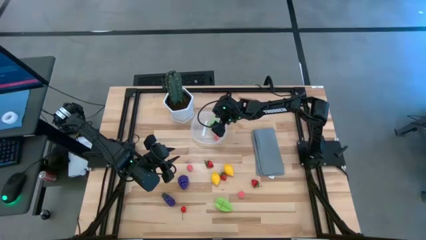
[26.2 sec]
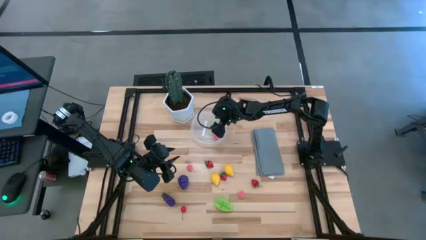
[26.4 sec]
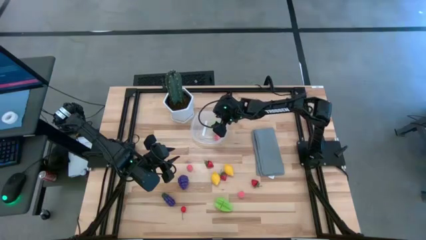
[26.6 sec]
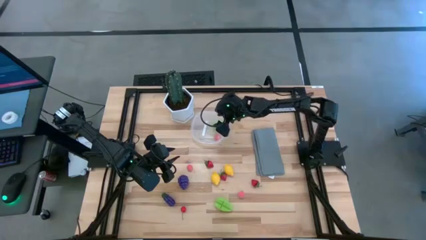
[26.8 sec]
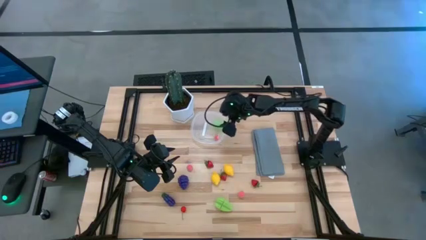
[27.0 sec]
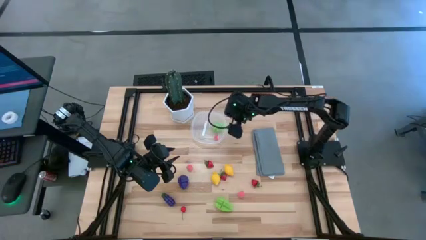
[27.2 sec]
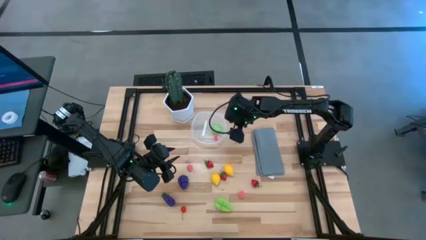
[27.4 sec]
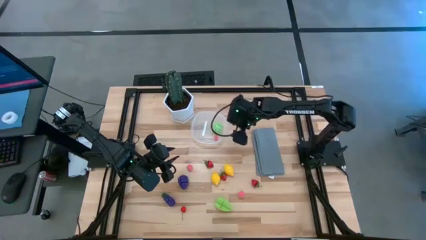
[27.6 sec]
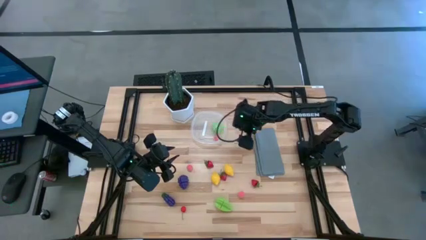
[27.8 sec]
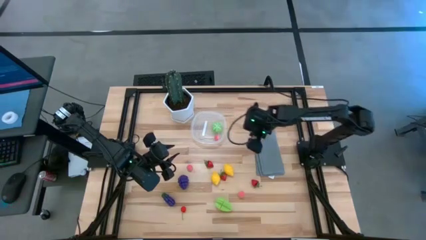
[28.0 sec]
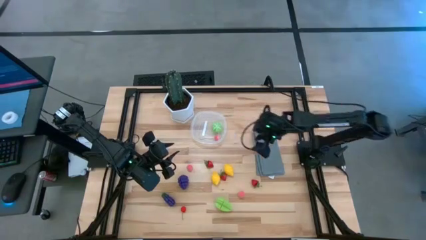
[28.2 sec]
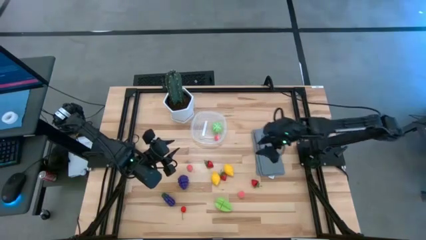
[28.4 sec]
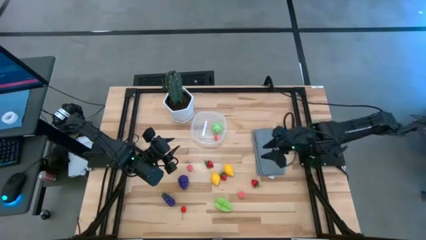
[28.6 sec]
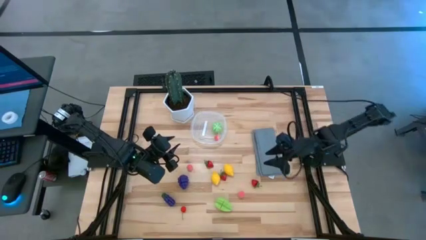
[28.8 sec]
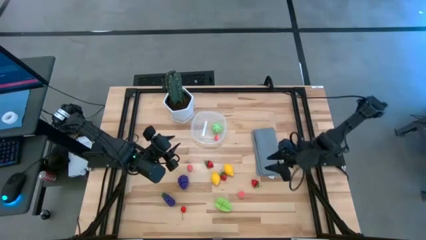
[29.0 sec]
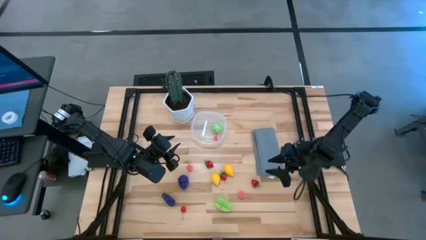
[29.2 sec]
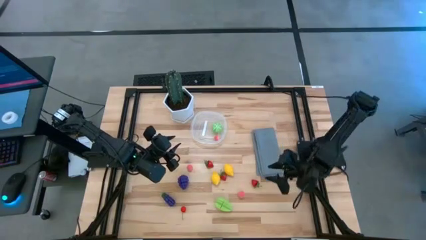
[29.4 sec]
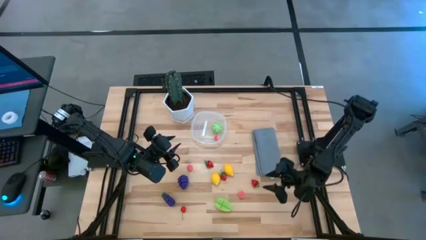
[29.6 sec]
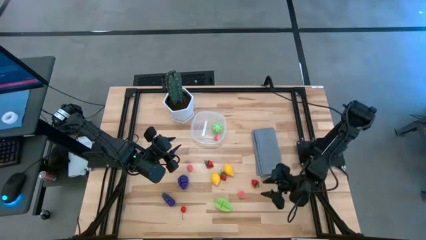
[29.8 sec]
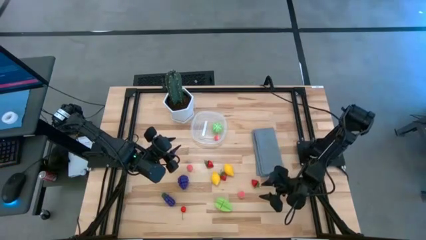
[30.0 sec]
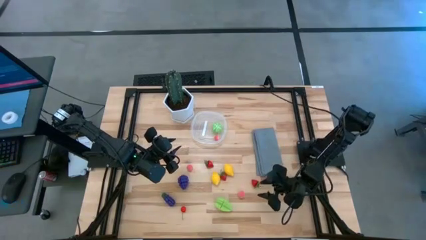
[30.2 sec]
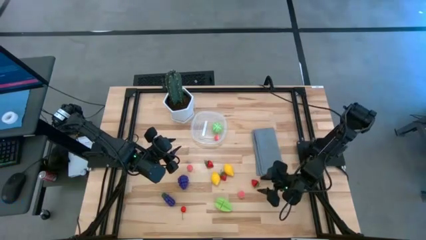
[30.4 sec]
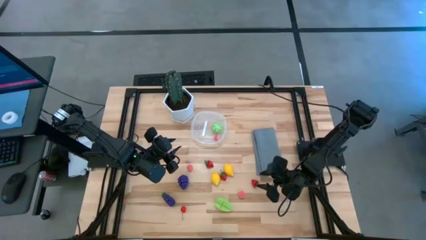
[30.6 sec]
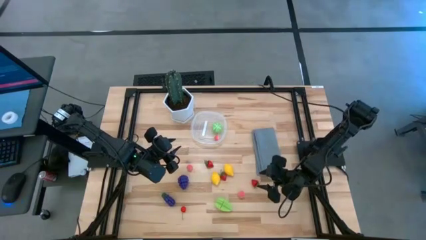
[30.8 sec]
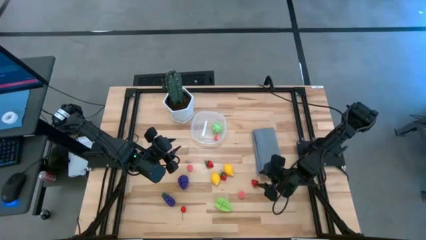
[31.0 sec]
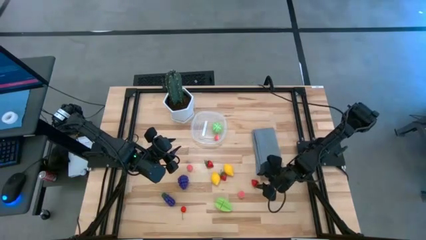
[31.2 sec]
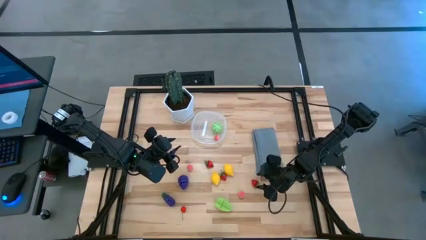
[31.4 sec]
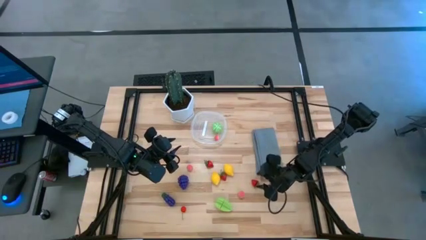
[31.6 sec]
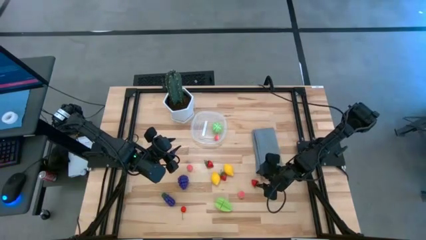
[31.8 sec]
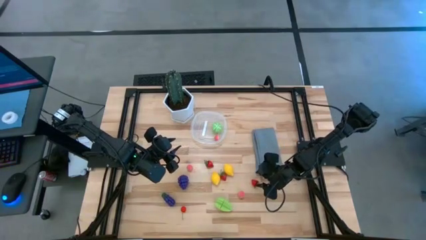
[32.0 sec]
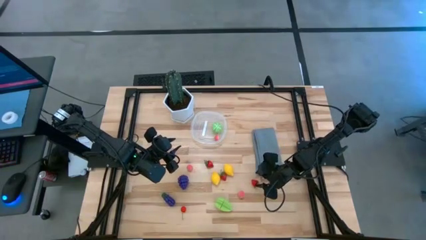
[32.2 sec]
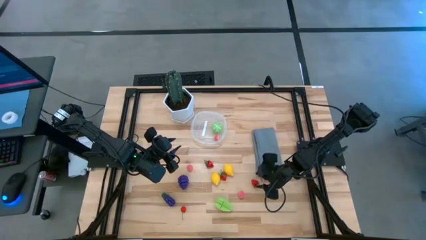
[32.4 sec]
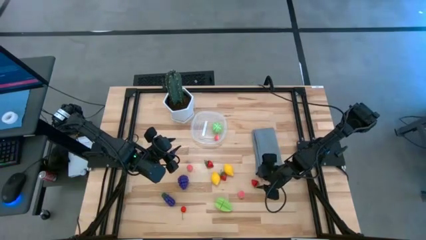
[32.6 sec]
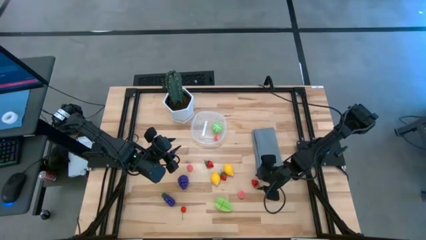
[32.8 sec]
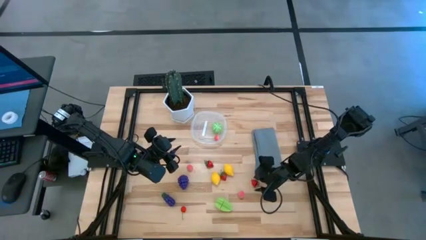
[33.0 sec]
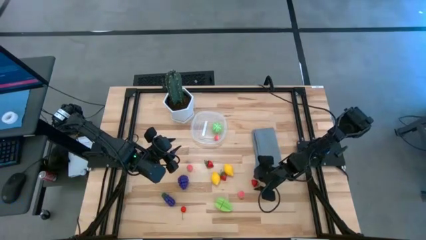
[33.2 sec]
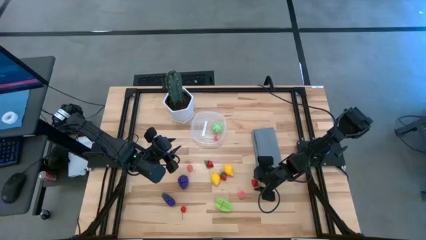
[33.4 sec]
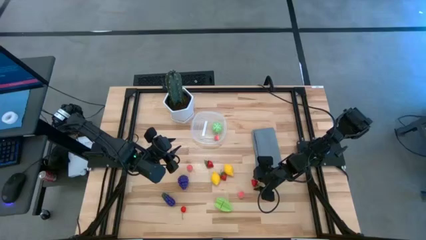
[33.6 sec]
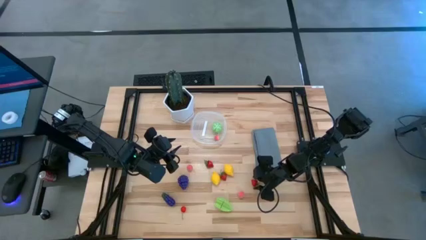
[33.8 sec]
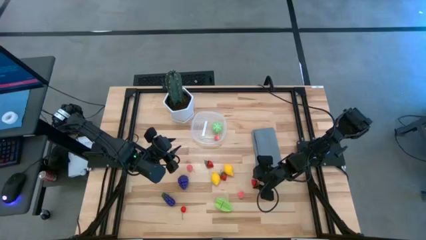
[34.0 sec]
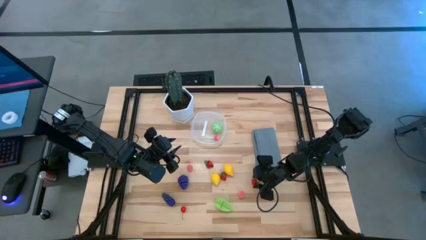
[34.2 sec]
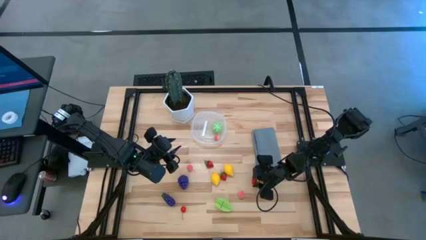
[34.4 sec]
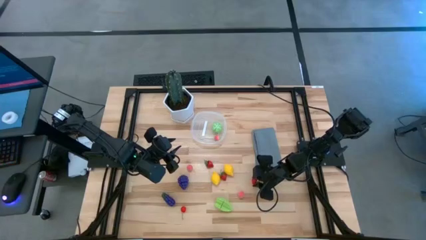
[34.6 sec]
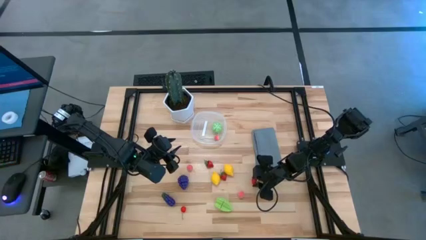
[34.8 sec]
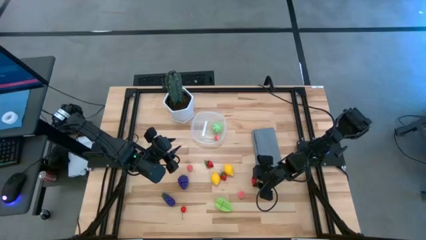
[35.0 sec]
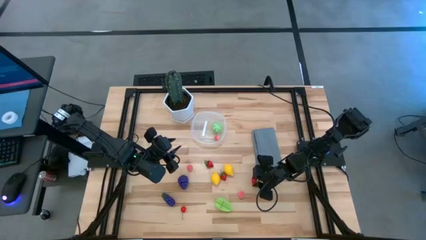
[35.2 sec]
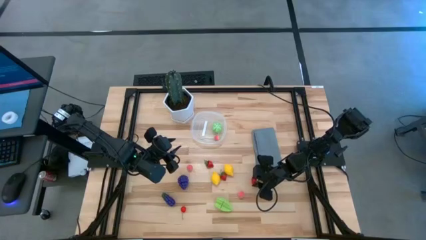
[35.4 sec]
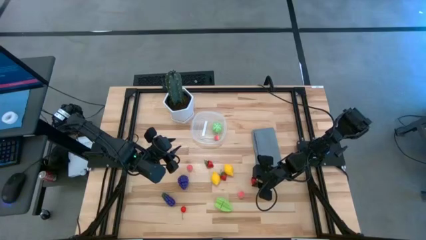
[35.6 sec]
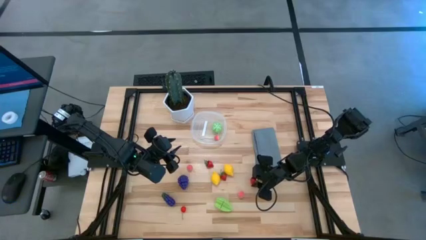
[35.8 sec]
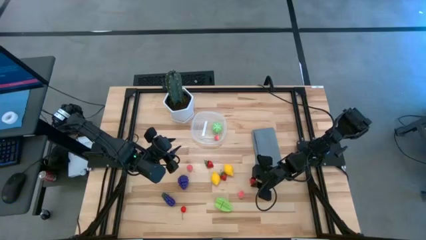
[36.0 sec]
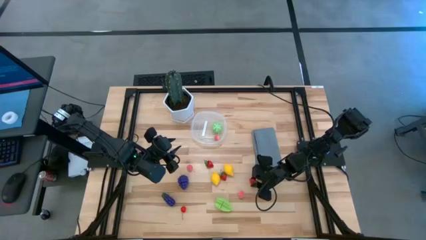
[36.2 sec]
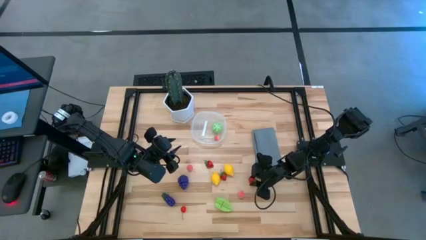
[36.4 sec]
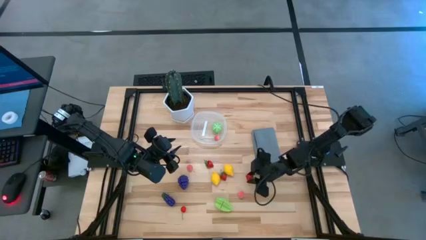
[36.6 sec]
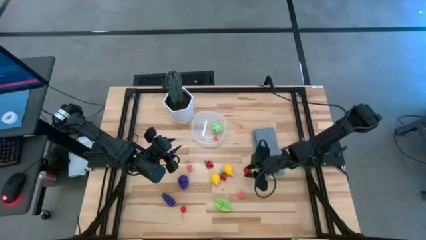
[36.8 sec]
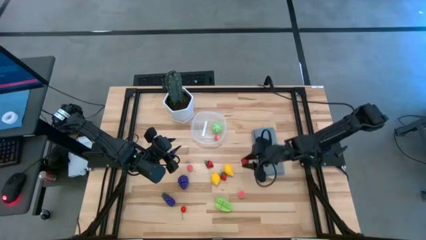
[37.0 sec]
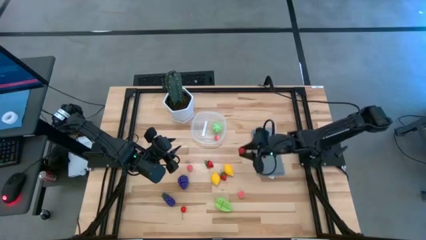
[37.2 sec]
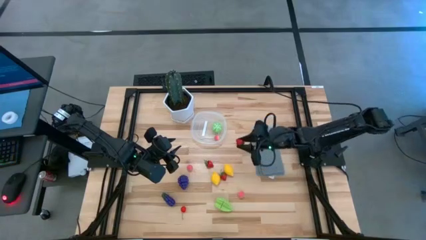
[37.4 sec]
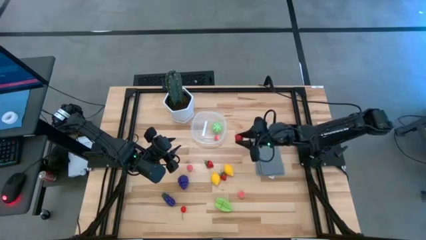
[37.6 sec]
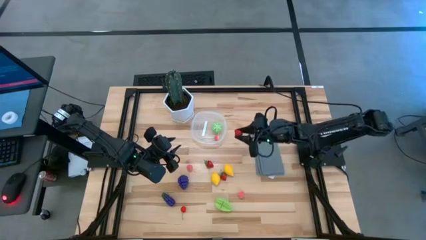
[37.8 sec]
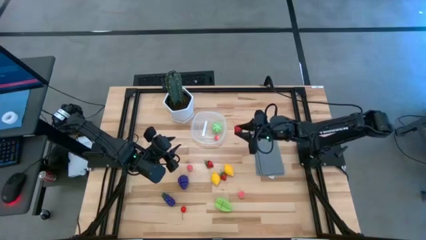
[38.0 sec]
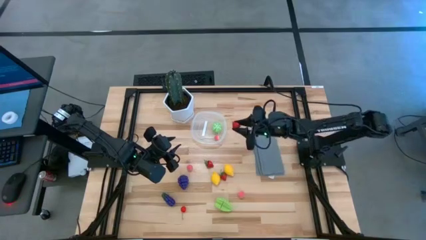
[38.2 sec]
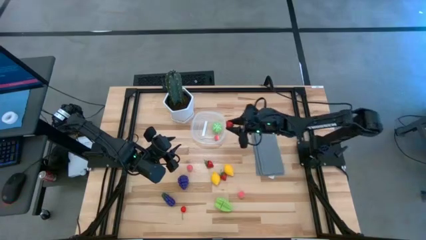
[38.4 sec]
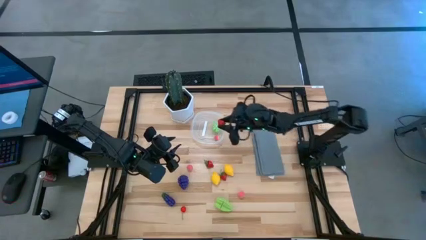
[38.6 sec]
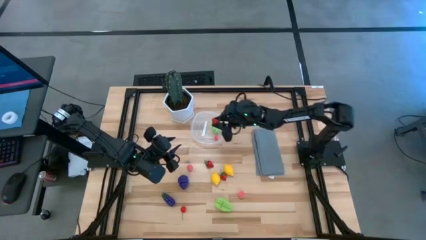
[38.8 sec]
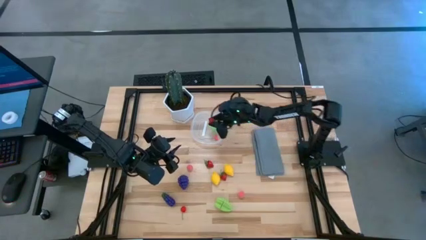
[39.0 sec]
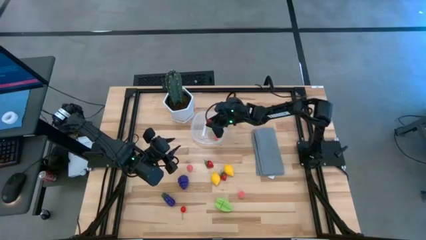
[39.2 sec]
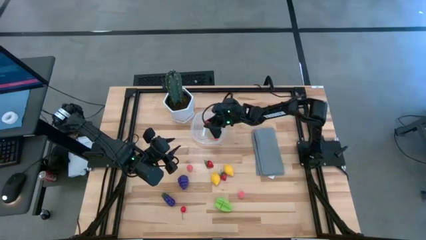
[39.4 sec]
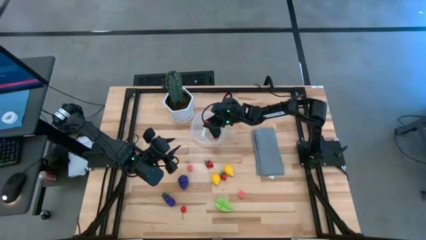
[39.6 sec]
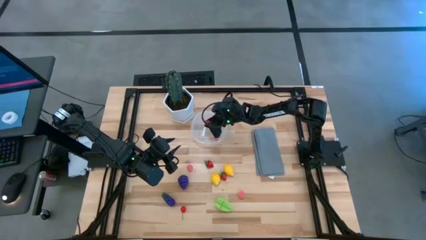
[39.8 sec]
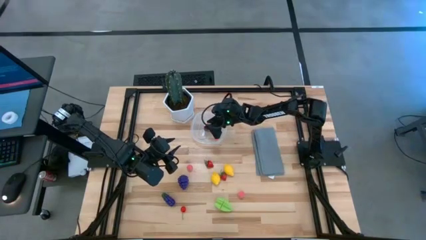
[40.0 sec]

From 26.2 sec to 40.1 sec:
Task: Pick and placing Produce into tupperware
Put the right strawberry into the transparent bin
